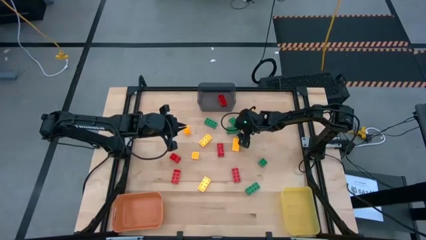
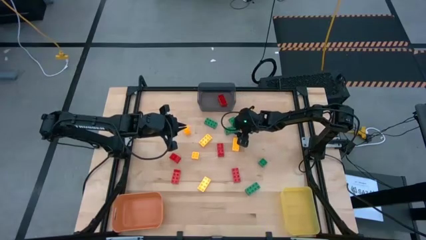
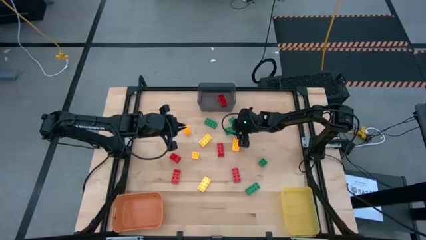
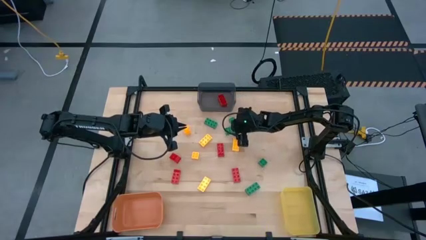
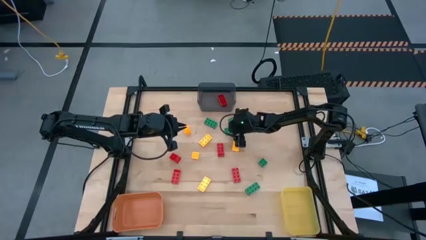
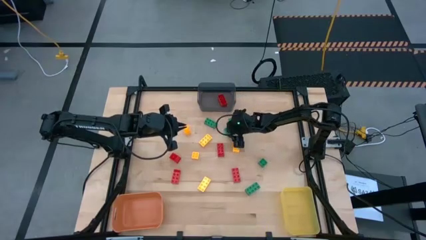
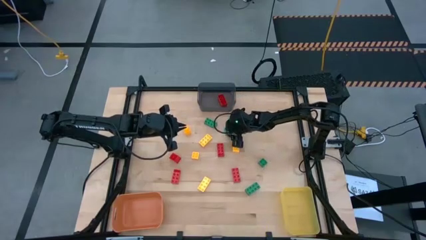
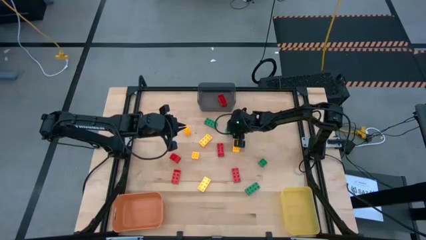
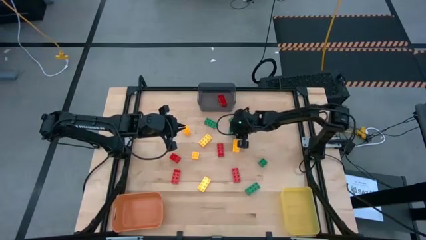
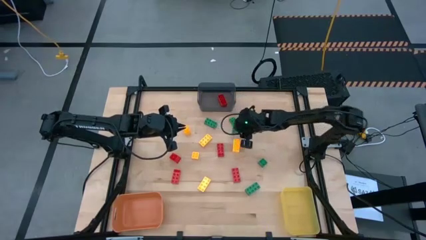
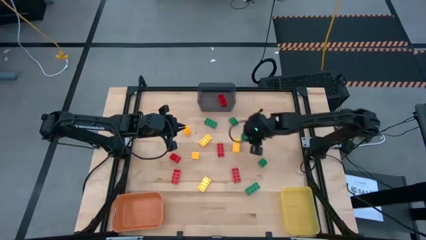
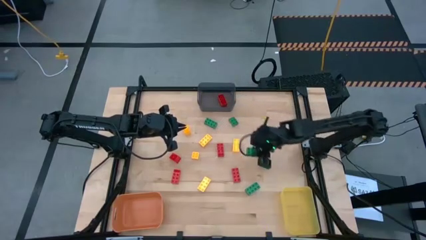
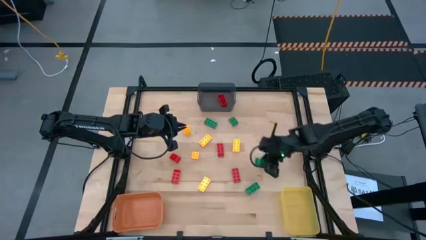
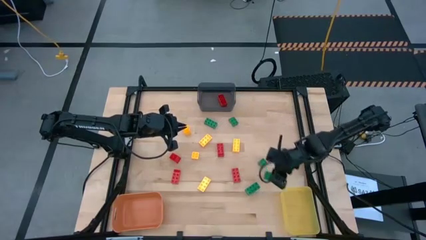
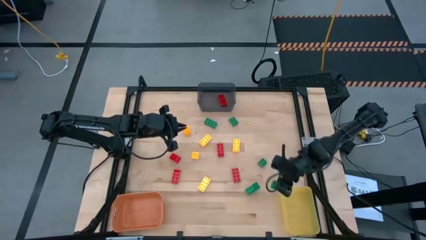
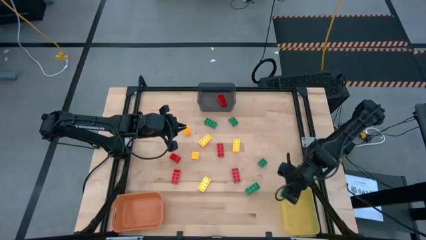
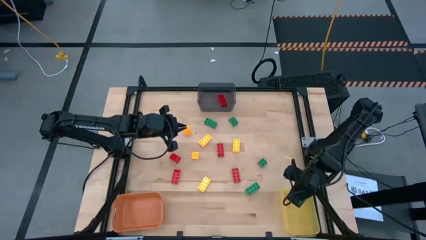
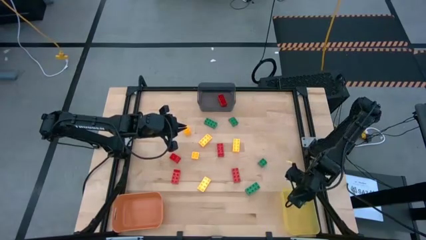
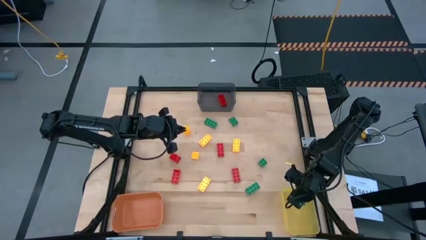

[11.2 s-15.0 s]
Task: Sort & place blocks by color
Put the green game piece into the yellow bin

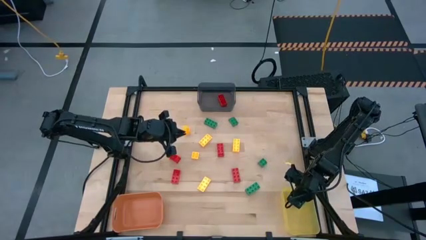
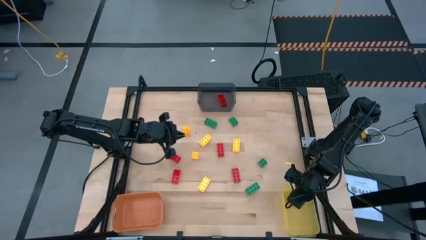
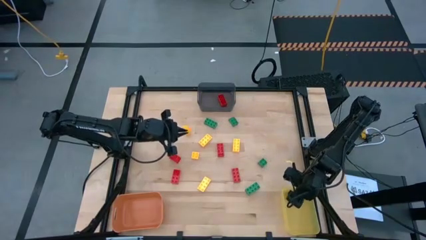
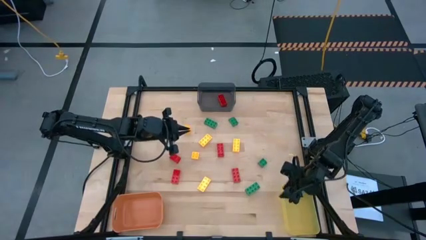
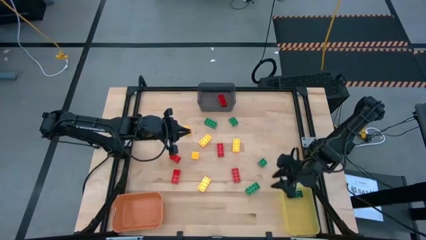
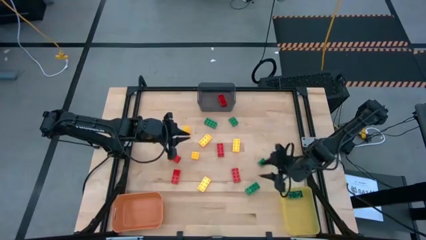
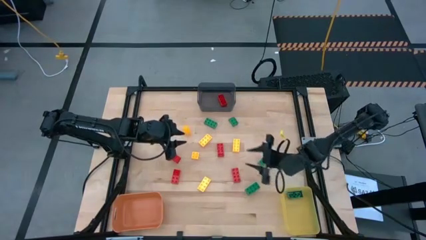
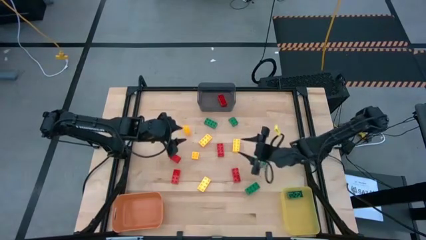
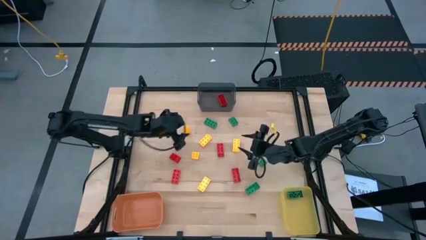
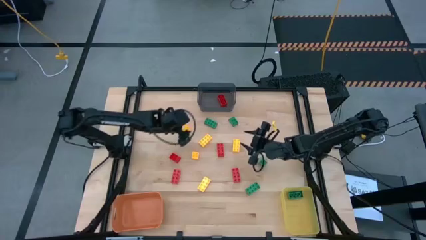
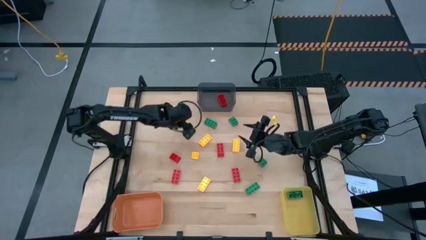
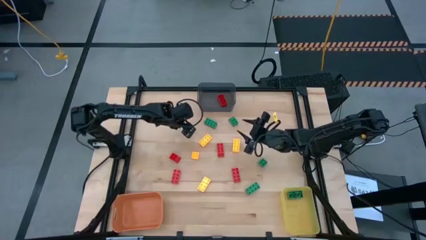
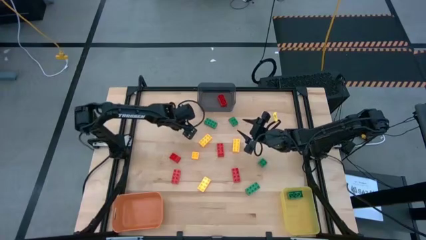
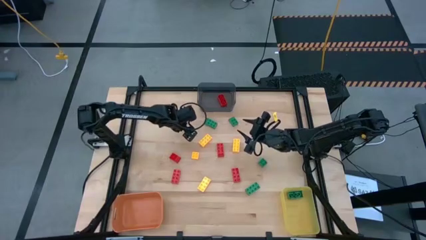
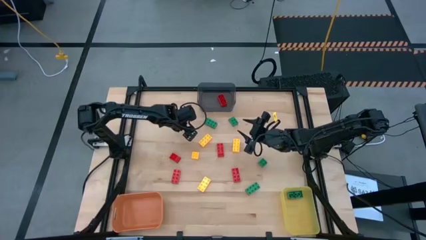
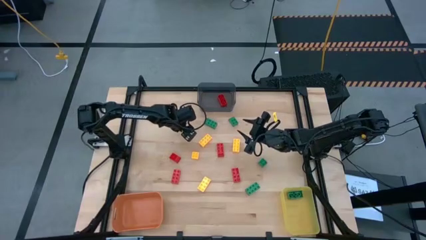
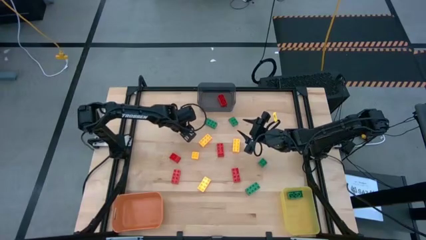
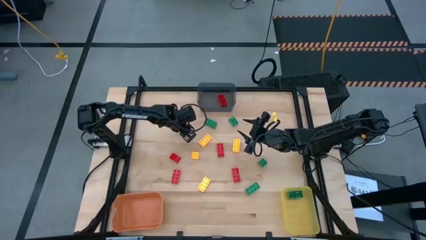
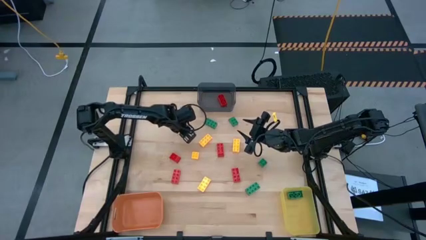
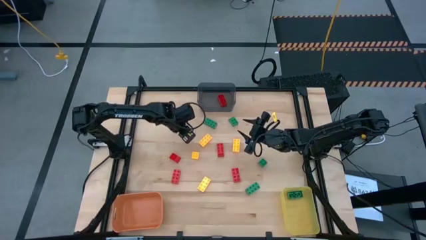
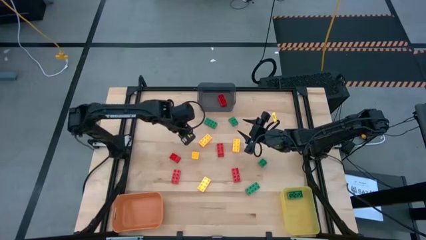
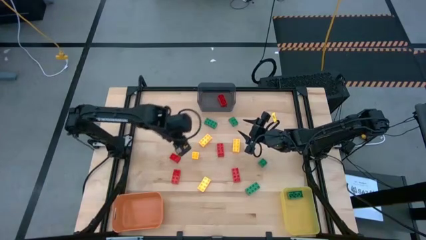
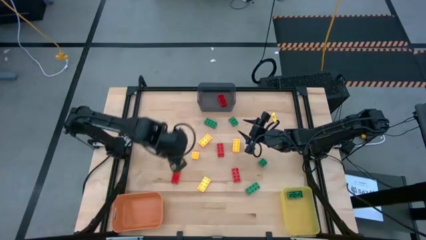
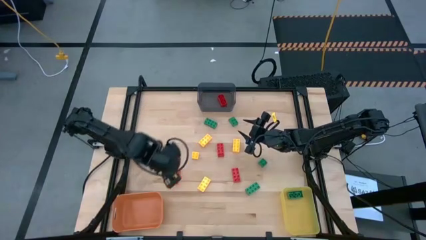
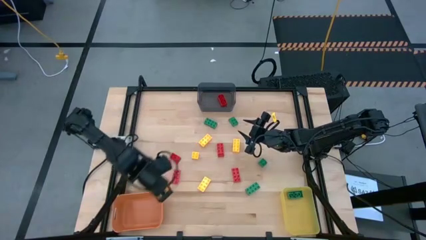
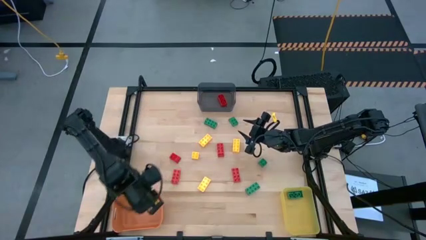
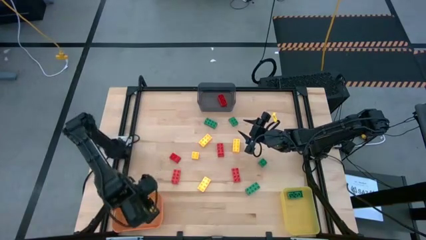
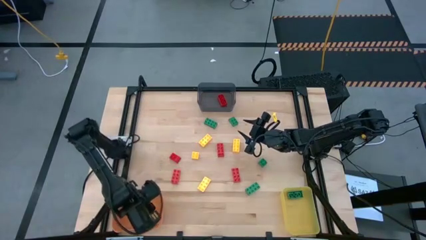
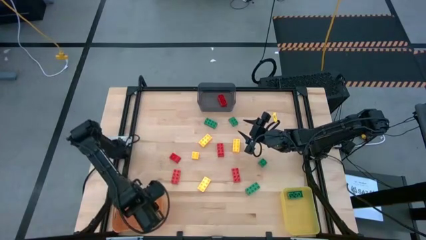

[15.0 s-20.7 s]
Put the yellow game piece into the orange bin

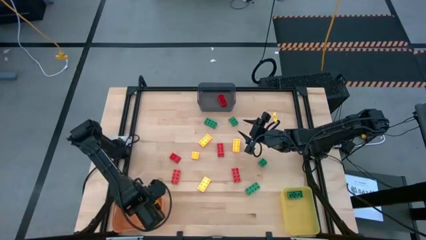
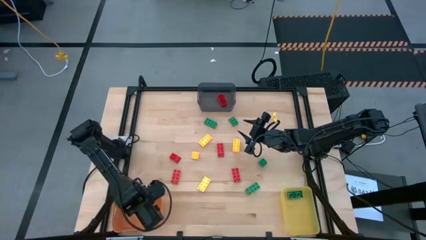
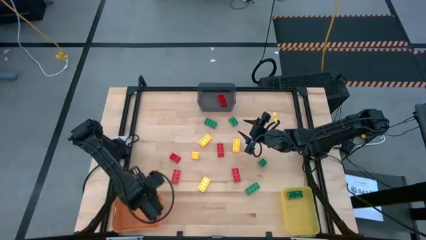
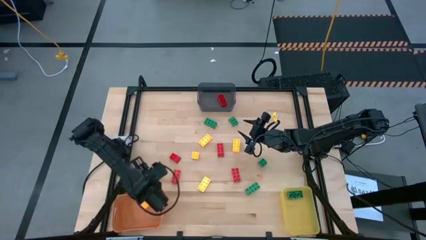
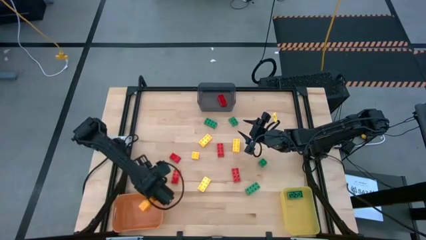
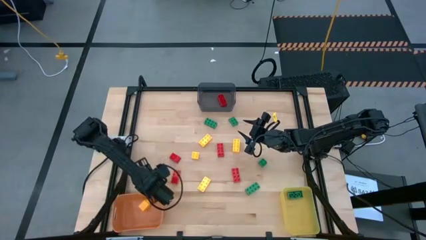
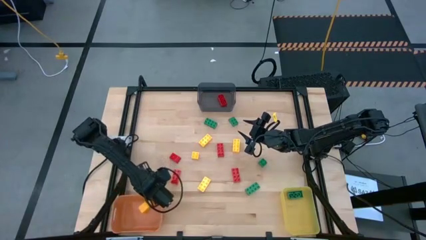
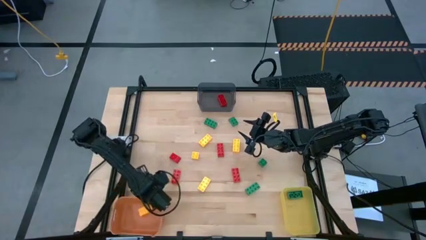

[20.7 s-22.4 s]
Adjust the orange bin

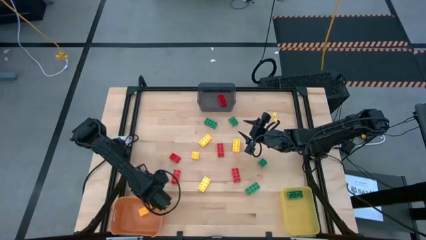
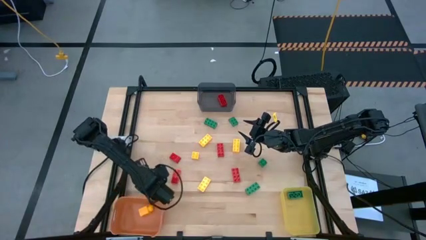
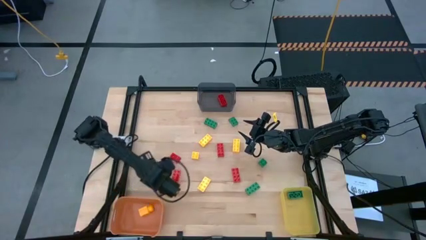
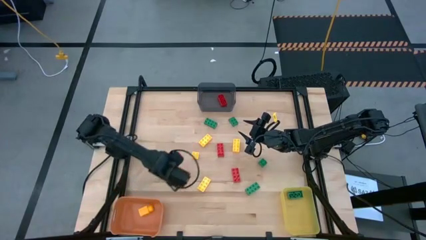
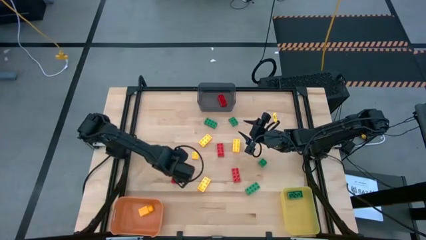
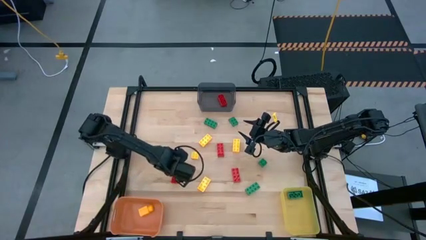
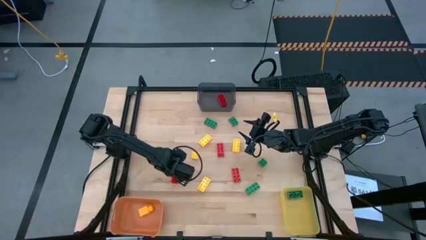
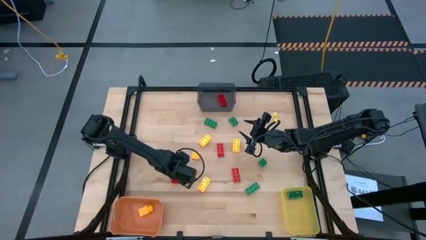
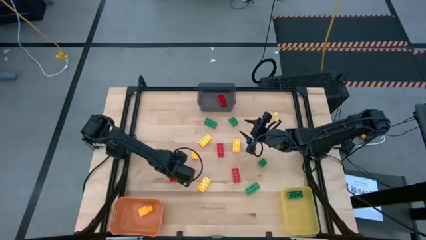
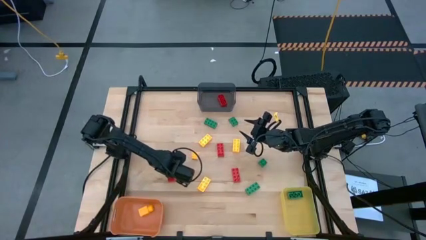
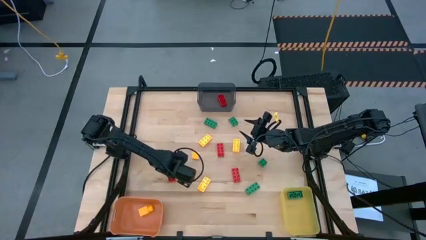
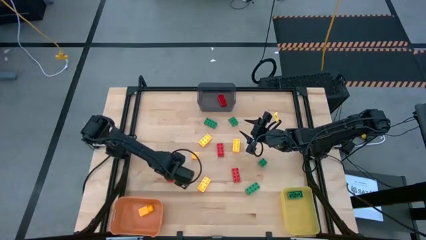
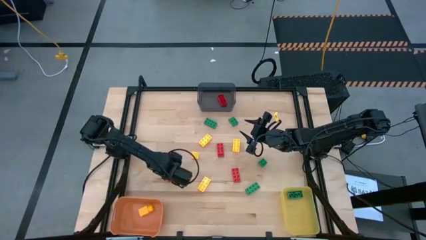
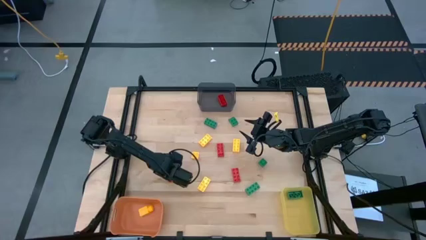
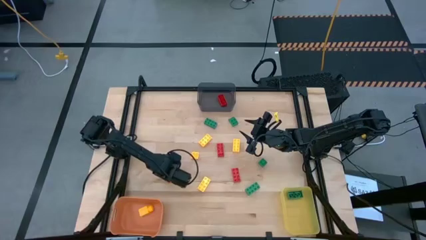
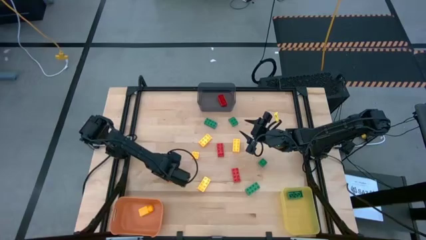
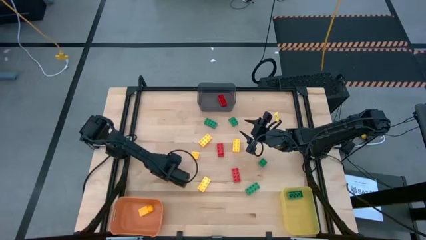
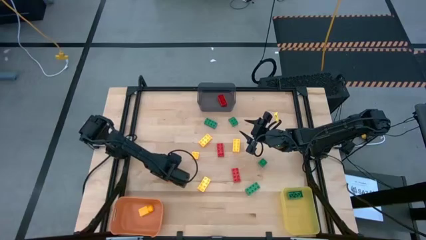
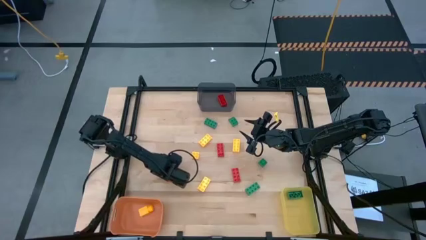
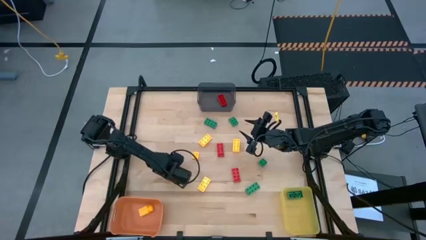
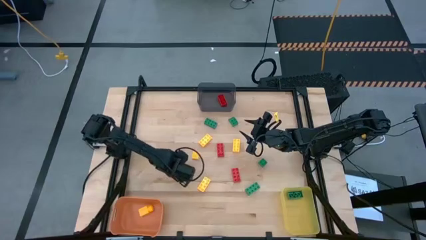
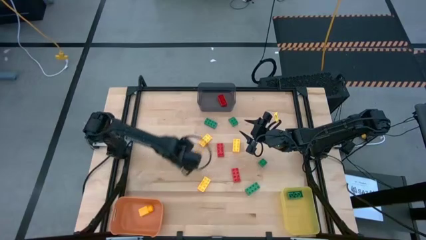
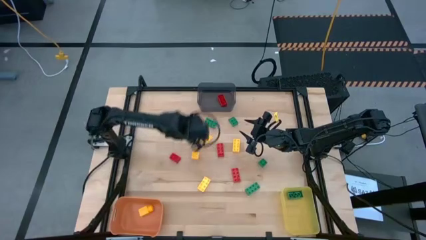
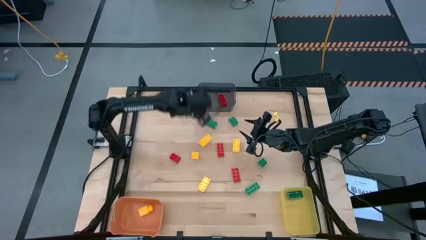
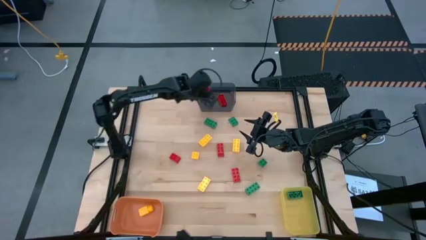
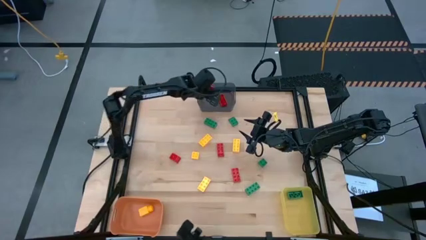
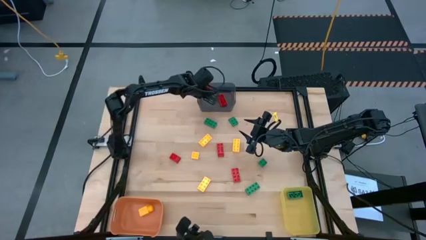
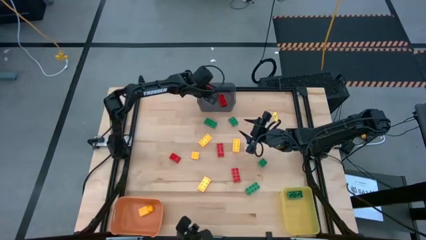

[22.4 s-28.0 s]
Put the red game piece into the black bin
